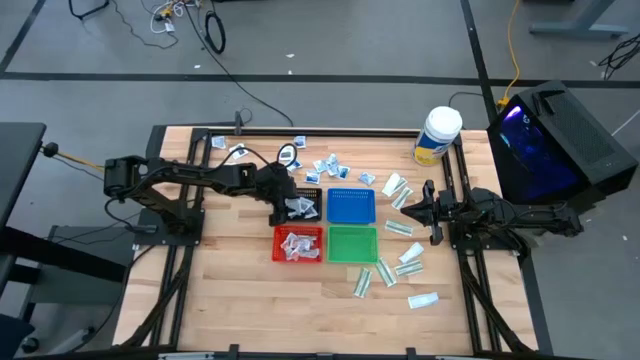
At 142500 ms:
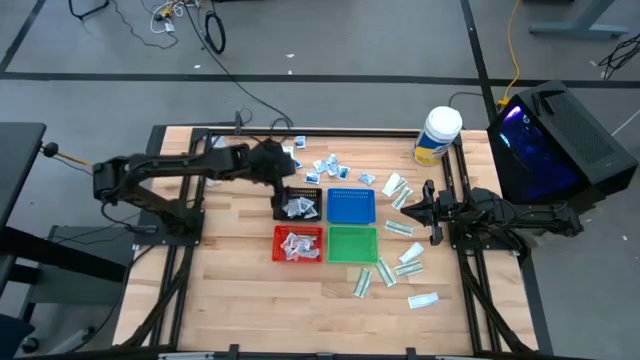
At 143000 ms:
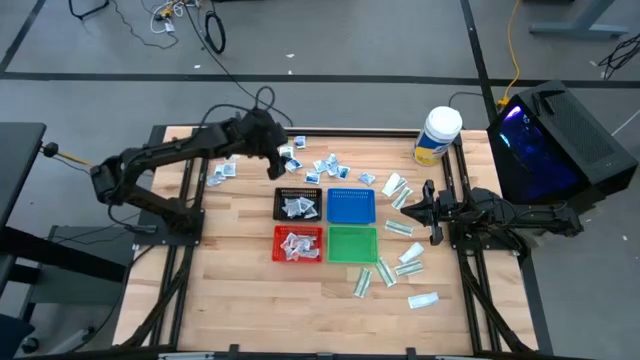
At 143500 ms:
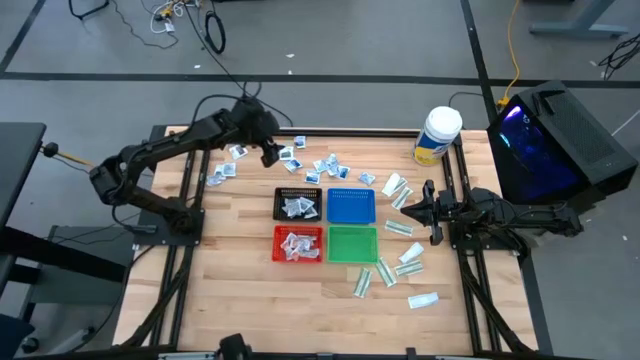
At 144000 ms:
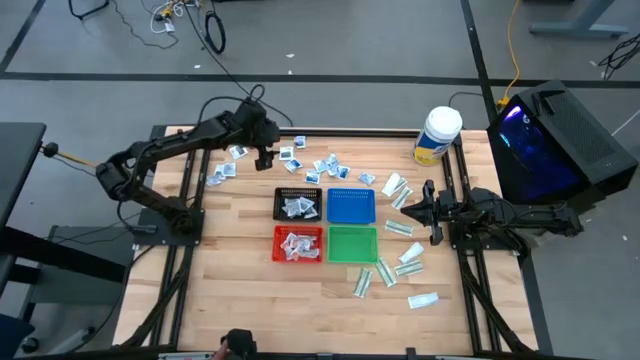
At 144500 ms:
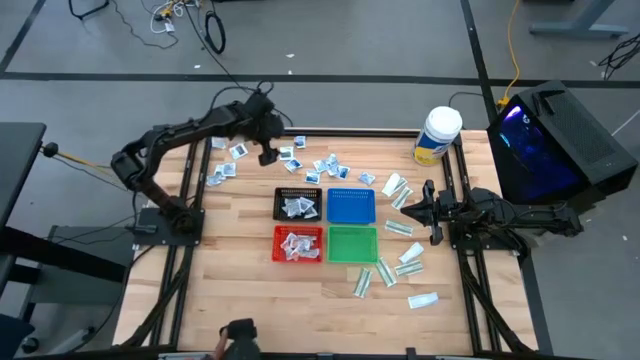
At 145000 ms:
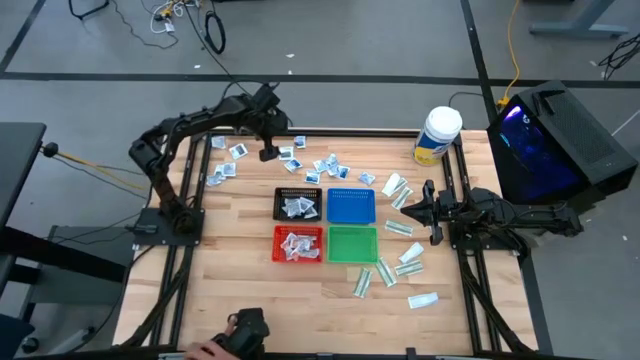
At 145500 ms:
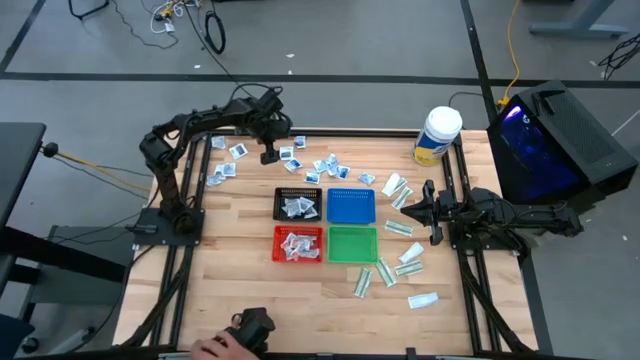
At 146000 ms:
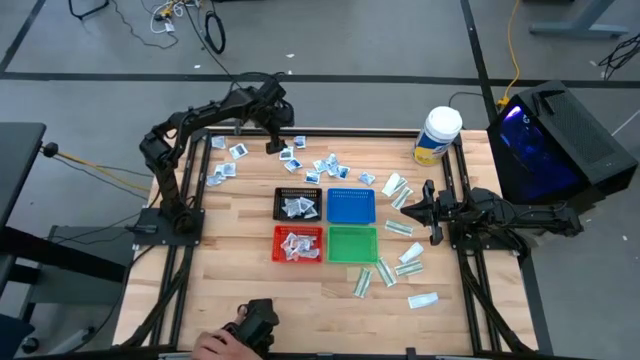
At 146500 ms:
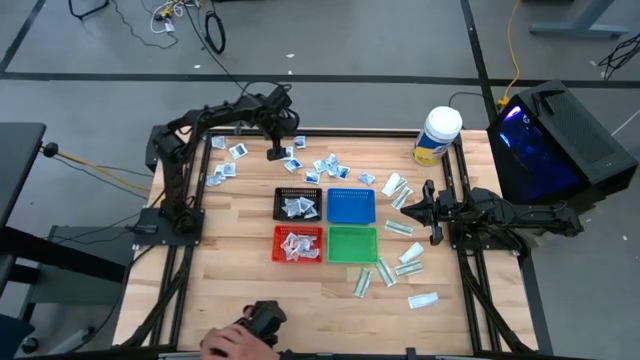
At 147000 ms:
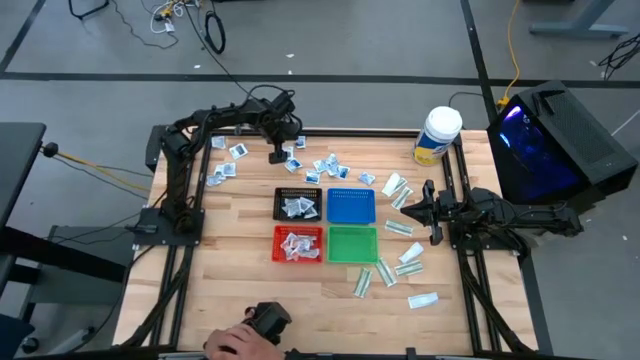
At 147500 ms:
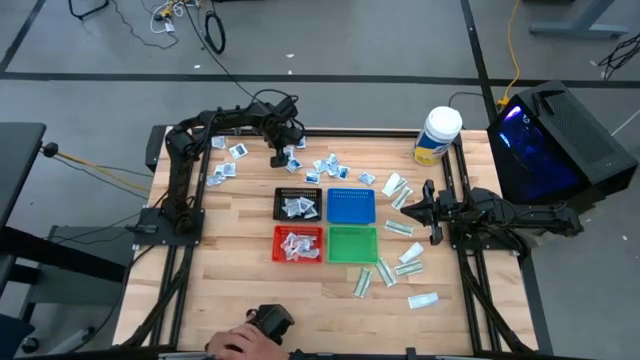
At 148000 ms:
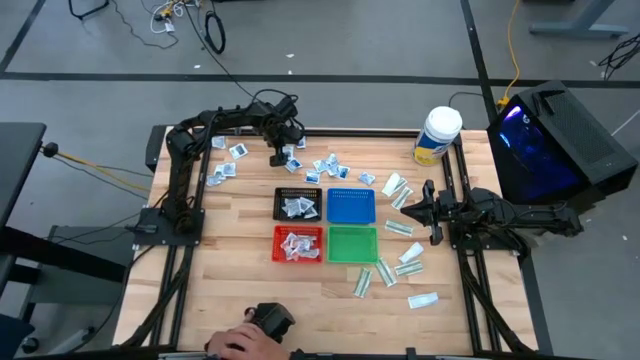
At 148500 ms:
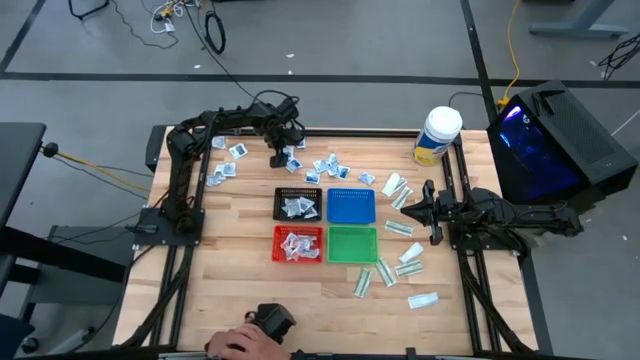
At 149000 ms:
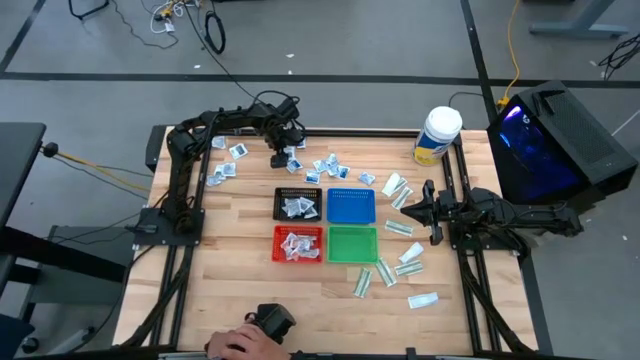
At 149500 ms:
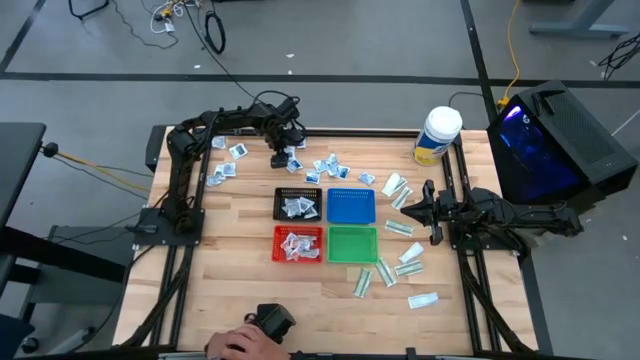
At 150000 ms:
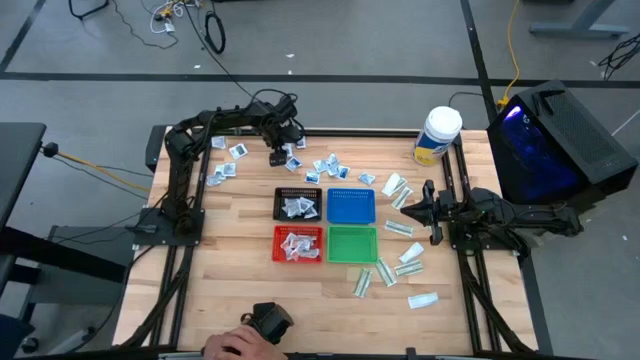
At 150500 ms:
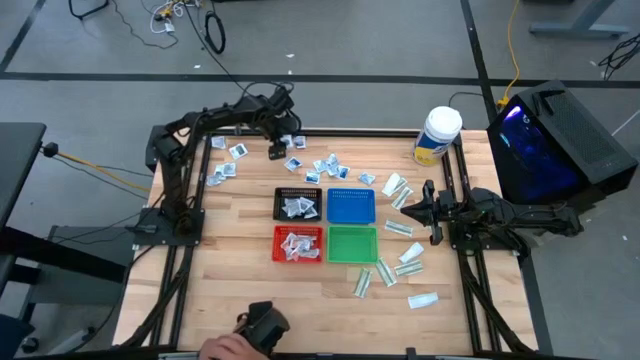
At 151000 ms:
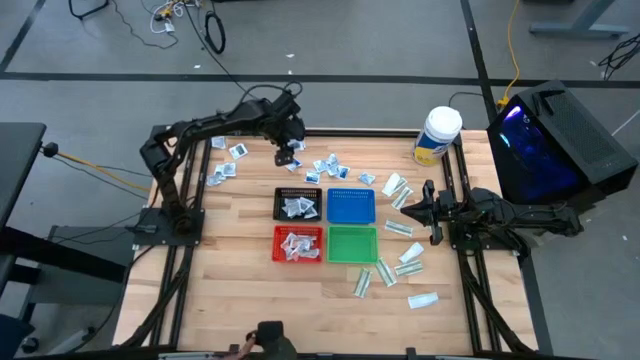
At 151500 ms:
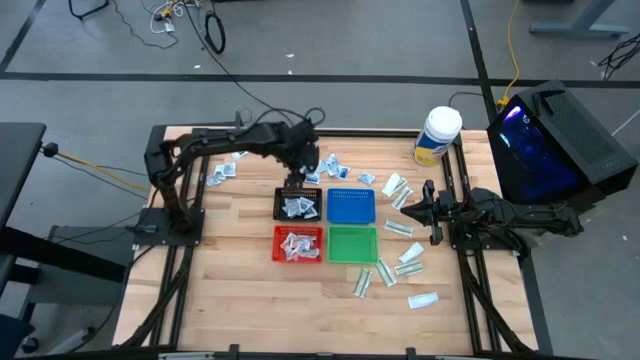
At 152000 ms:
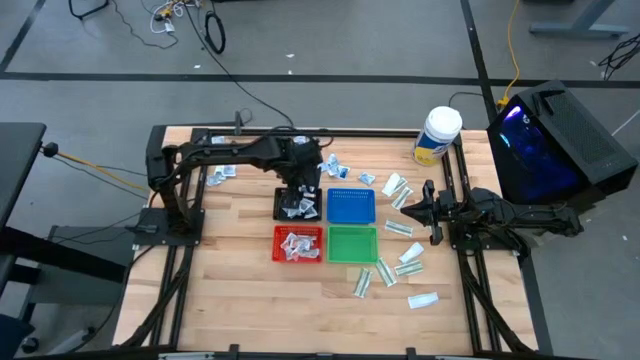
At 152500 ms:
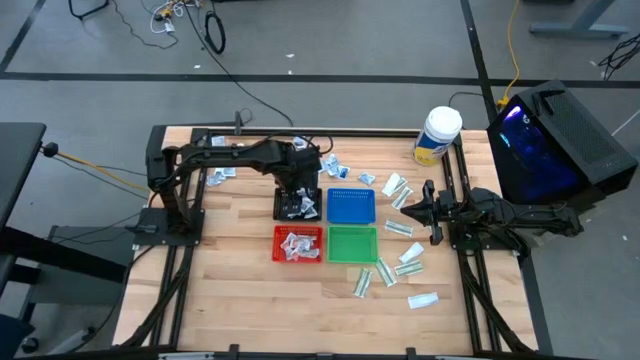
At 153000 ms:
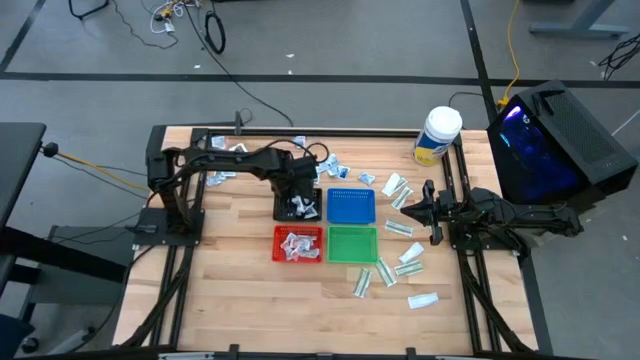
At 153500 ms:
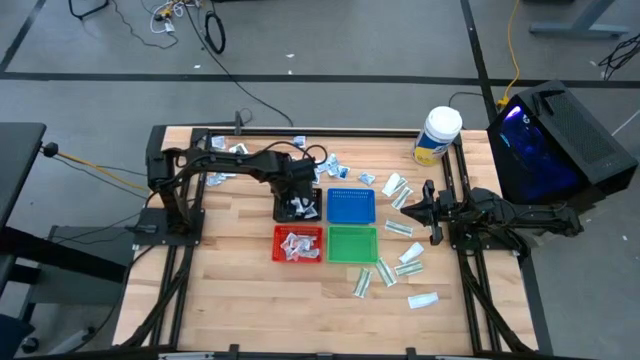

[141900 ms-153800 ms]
Task: Pick & Place First Aid Supplies
Put the gray towelette pack into the black bin

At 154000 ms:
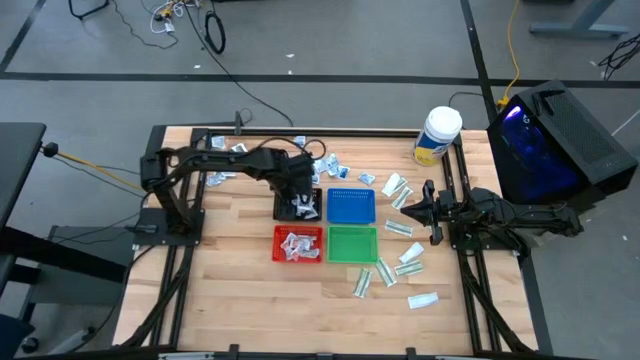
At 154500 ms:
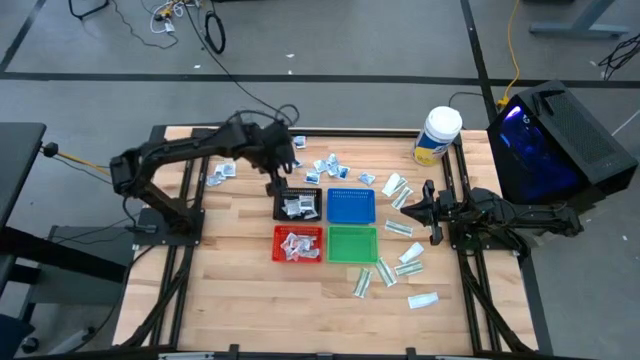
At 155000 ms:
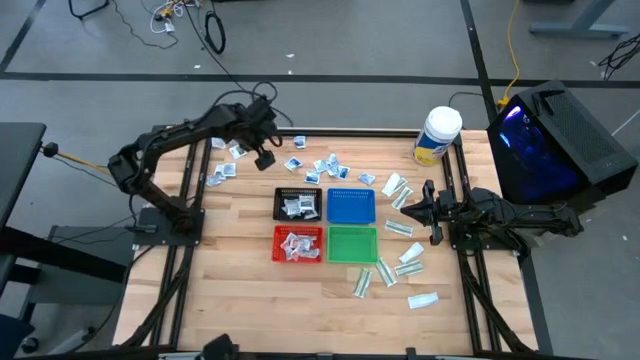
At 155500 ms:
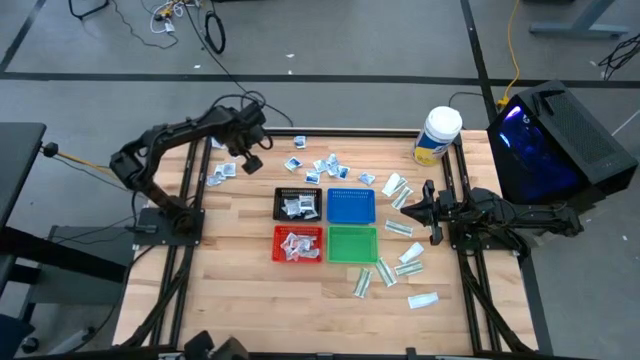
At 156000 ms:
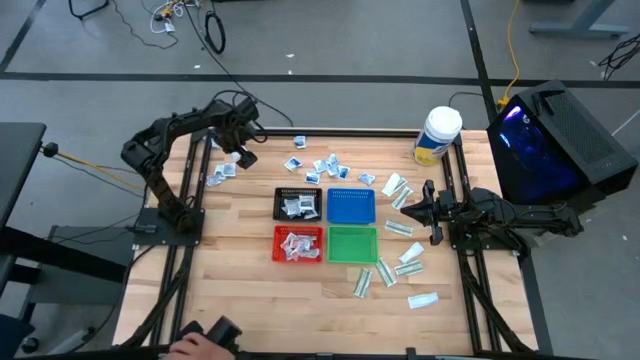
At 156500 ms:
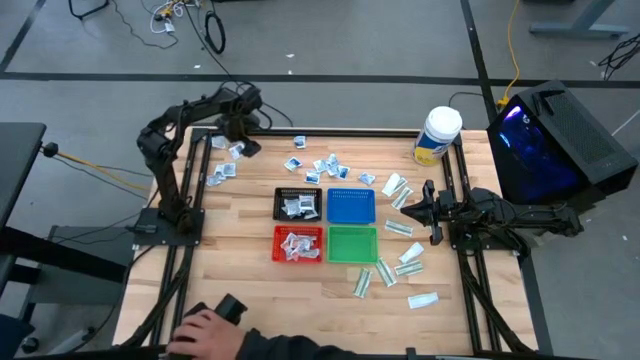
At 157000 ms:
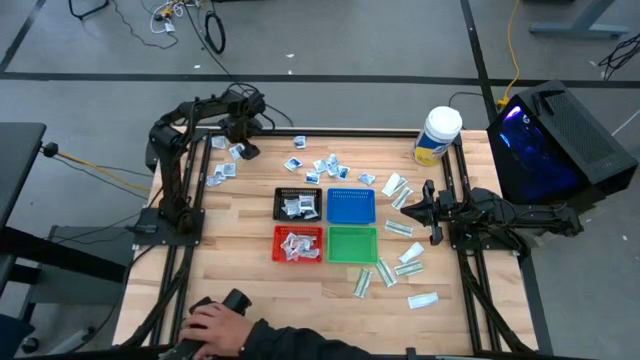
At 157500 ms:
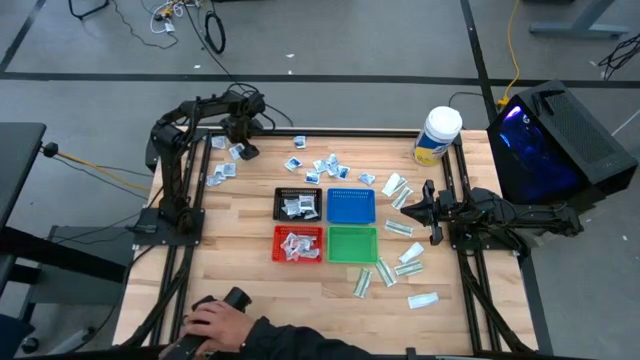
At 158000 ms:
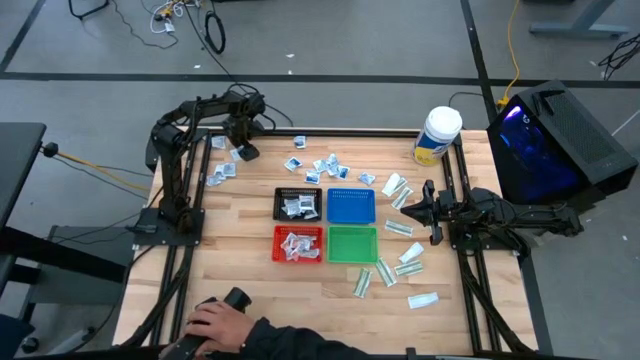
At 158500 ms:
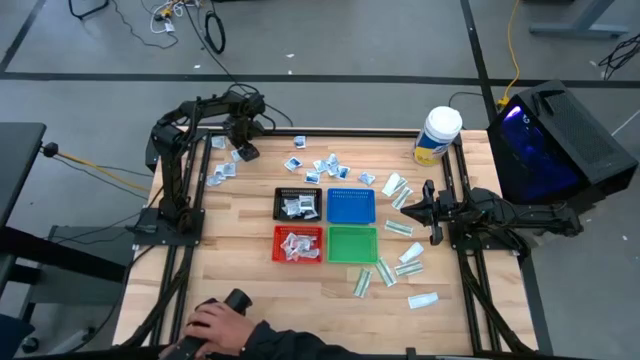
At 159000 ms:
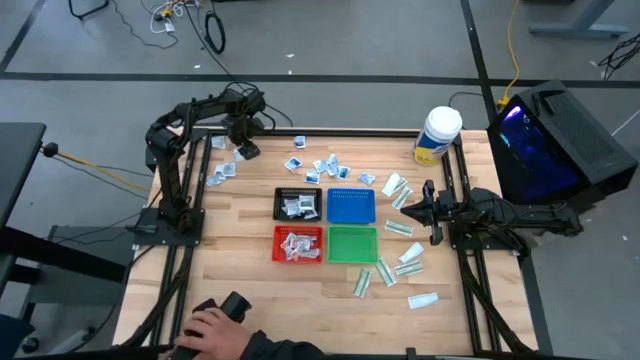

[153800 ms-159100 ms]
Put the gray towelette pack into the black bin

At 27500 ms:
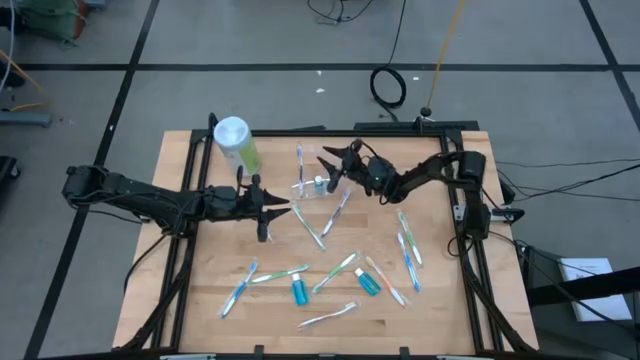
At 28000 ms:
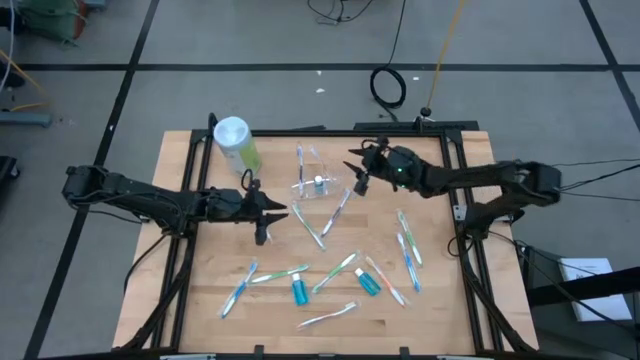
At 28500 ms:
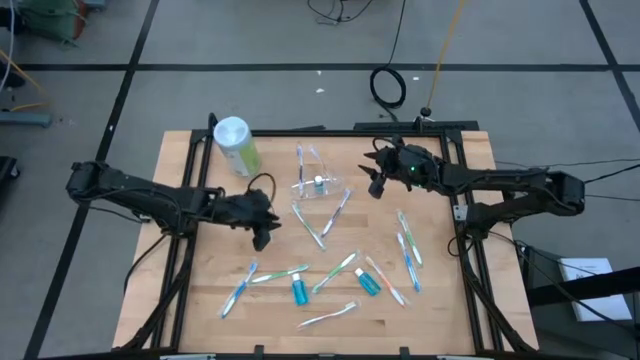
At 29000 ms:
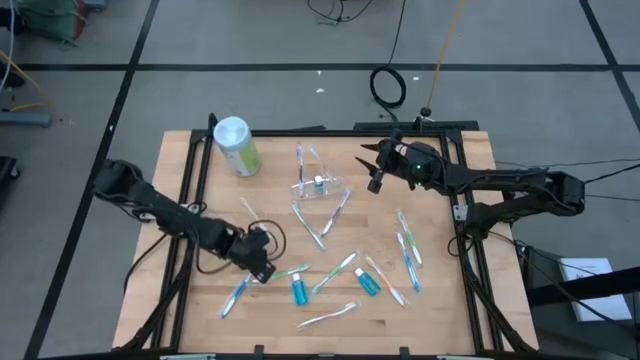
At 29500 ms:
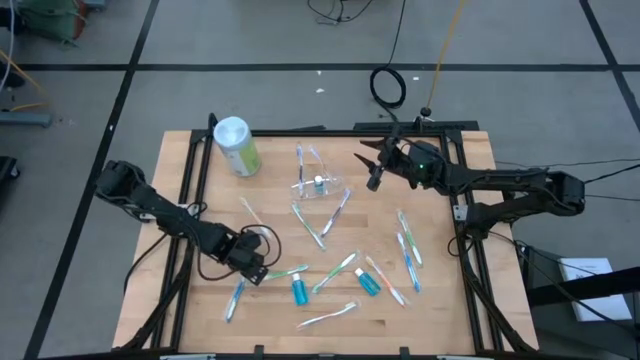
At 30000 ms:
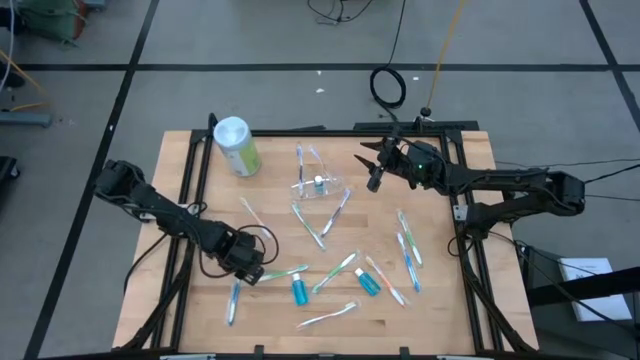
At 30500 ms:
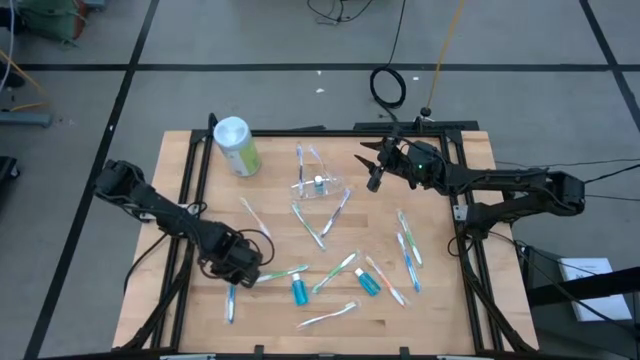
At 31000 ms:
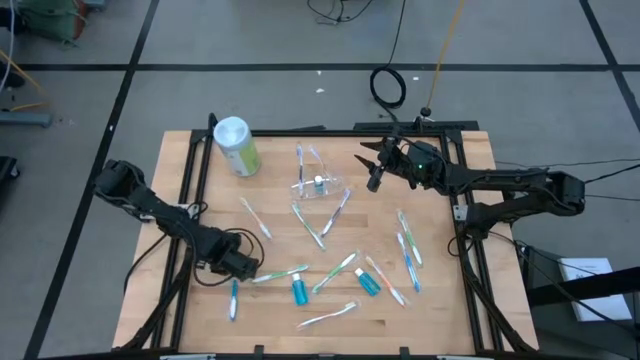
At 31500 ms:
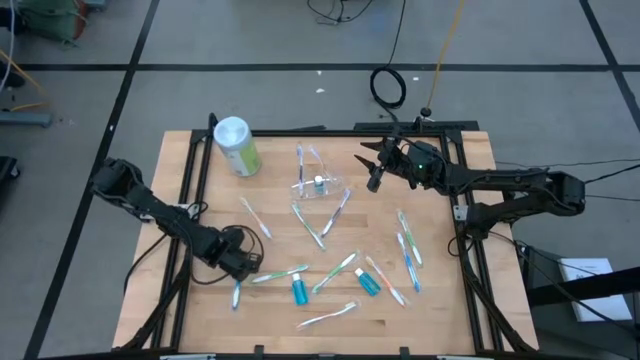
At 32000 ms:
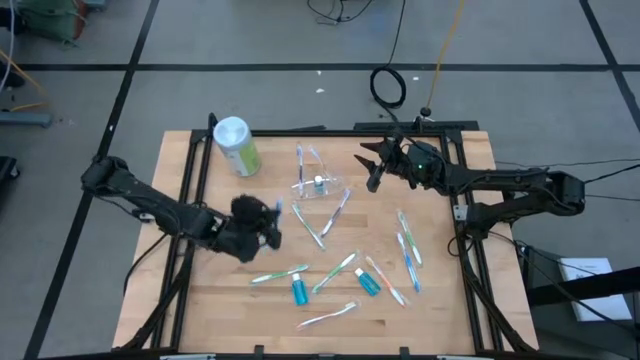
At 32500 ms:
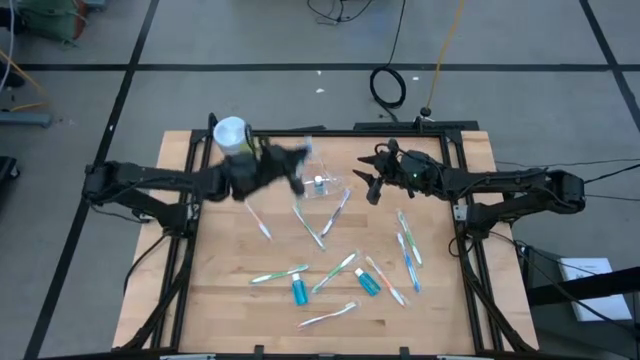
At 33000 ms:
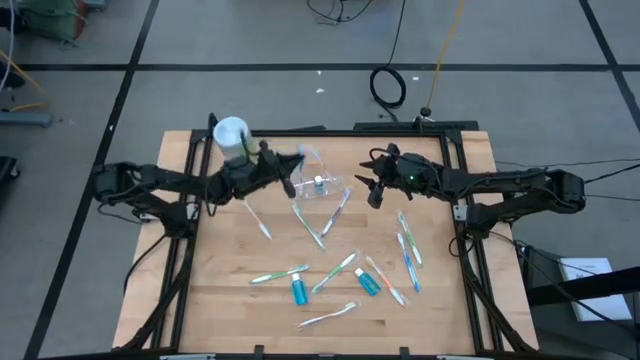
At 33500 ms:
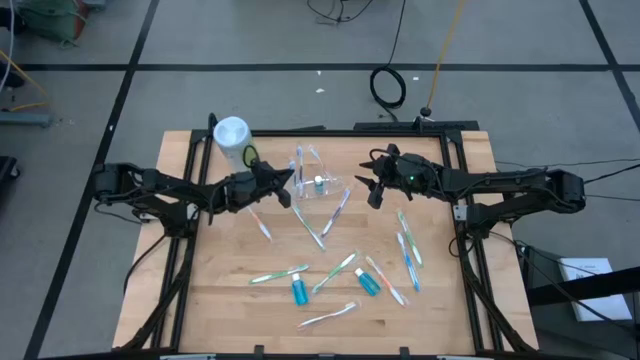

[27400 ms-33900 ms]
Task: Pick & Place toothbrushing station
Put the blue toothbrush into the transparent organizer
